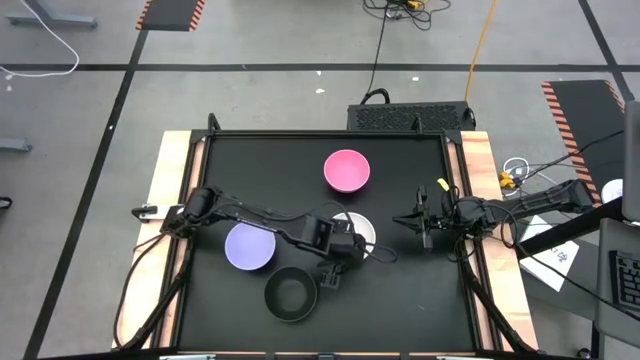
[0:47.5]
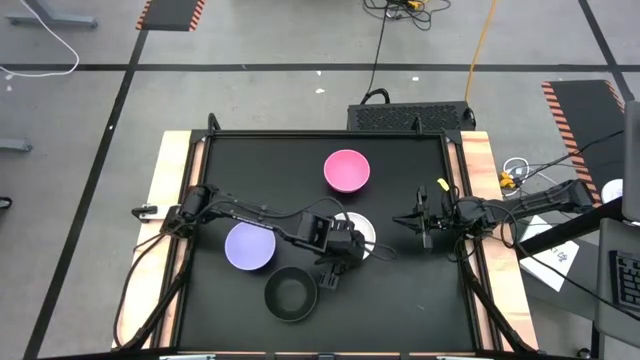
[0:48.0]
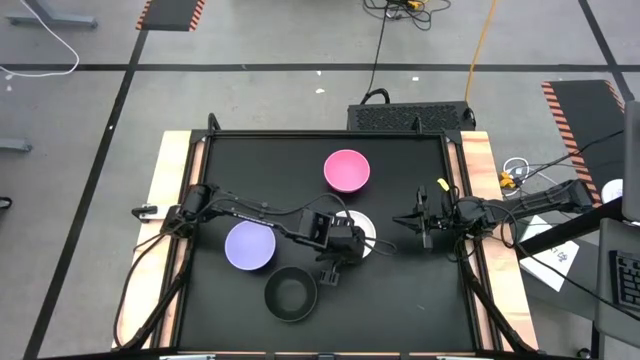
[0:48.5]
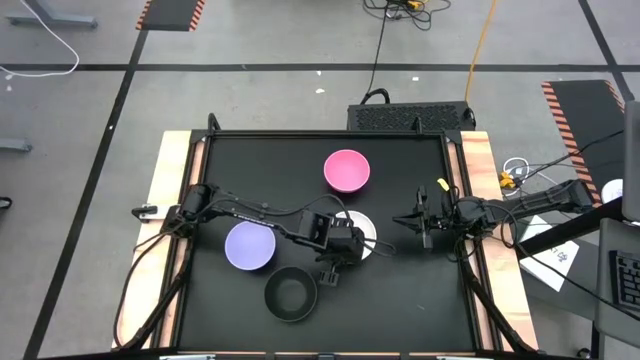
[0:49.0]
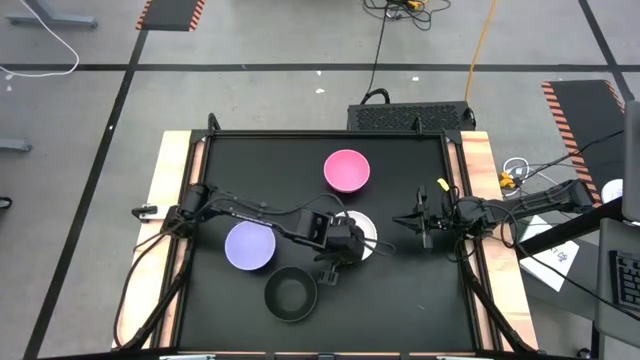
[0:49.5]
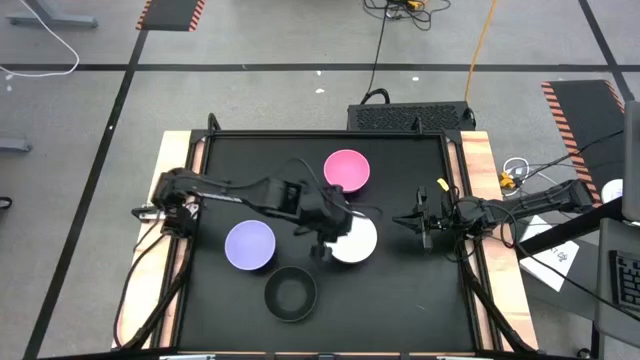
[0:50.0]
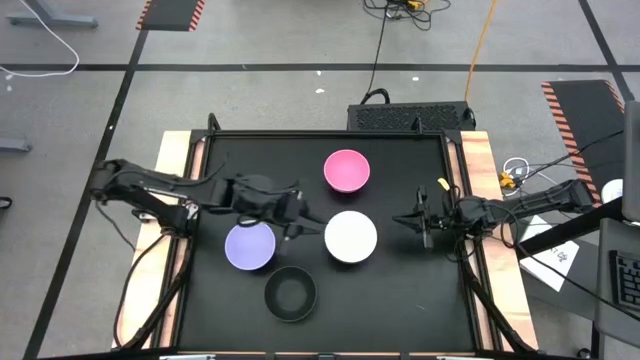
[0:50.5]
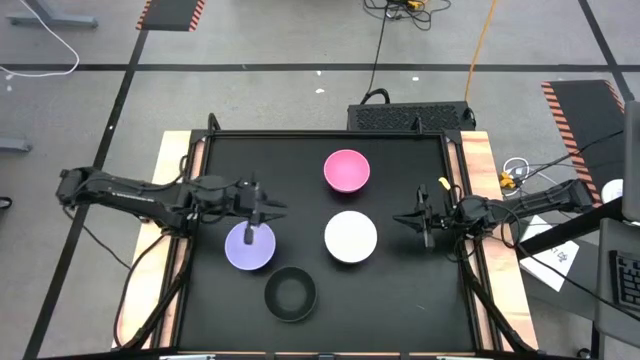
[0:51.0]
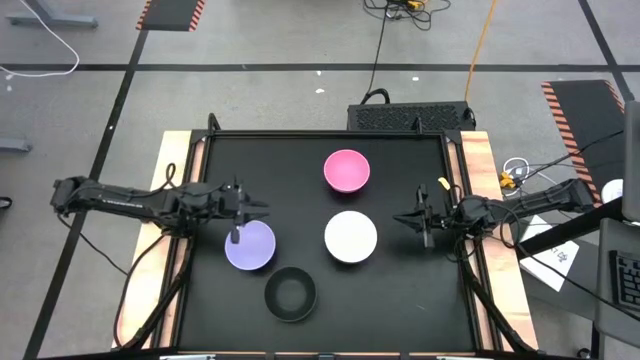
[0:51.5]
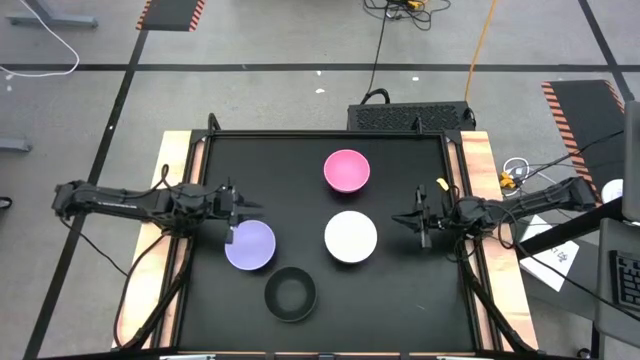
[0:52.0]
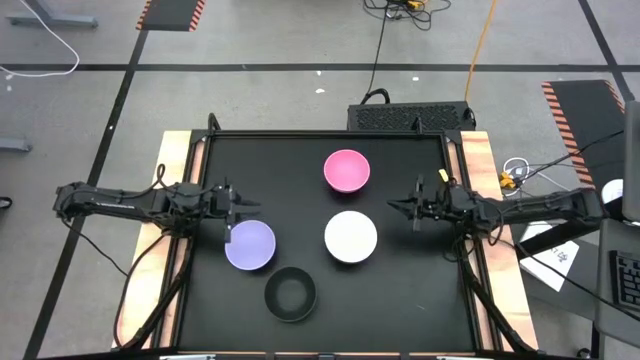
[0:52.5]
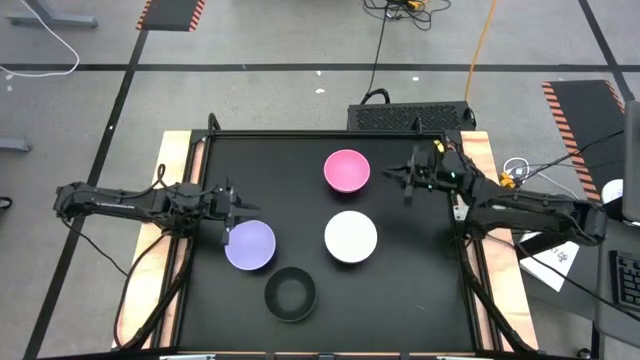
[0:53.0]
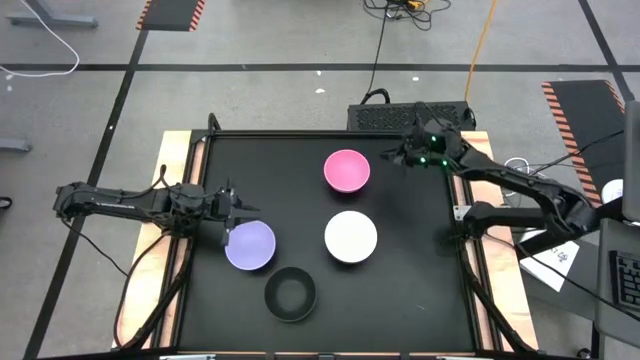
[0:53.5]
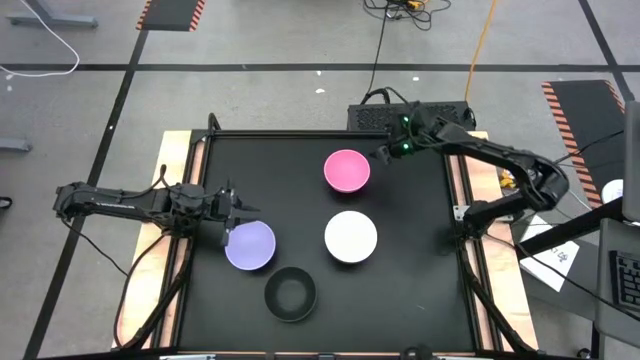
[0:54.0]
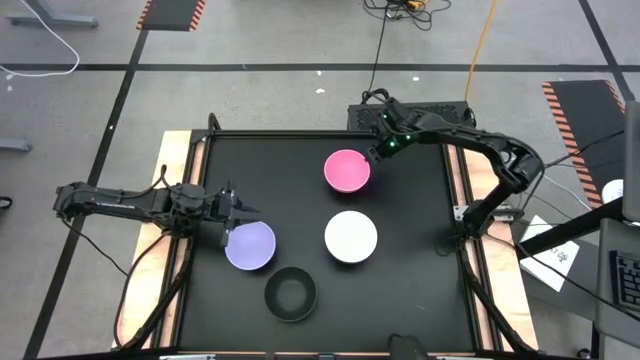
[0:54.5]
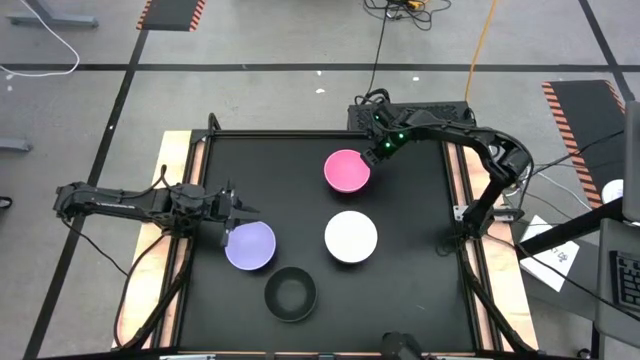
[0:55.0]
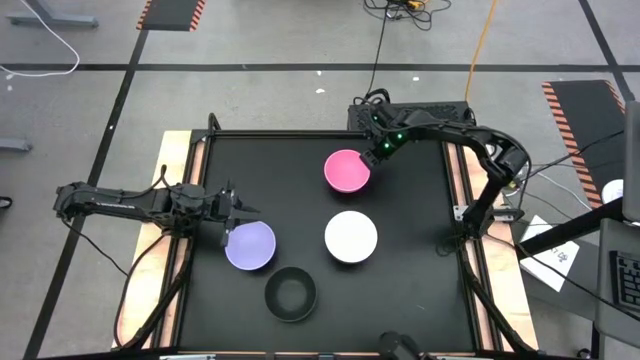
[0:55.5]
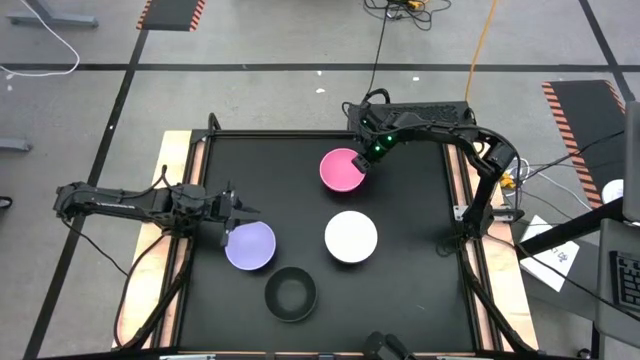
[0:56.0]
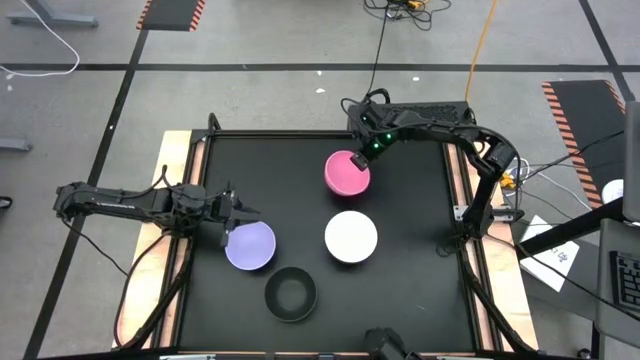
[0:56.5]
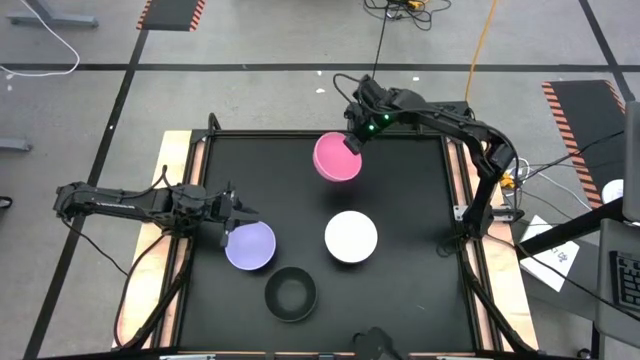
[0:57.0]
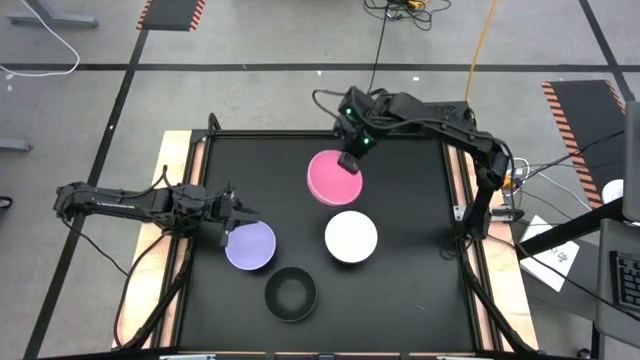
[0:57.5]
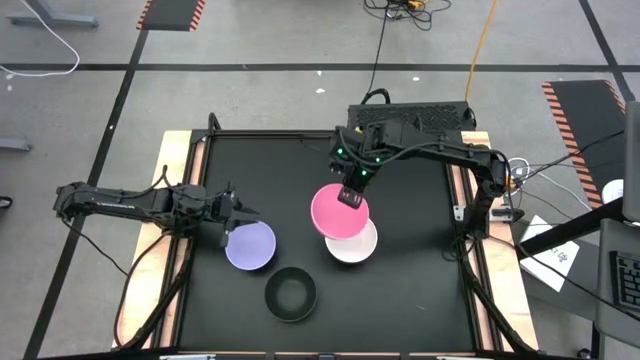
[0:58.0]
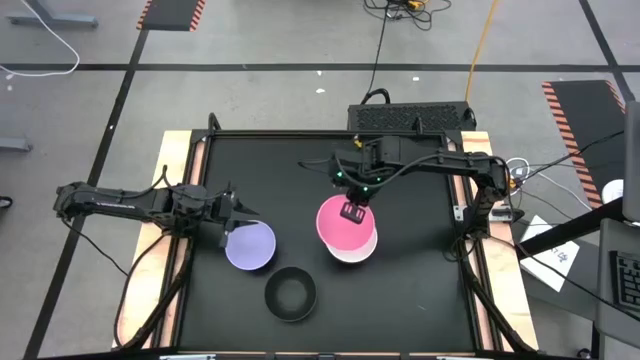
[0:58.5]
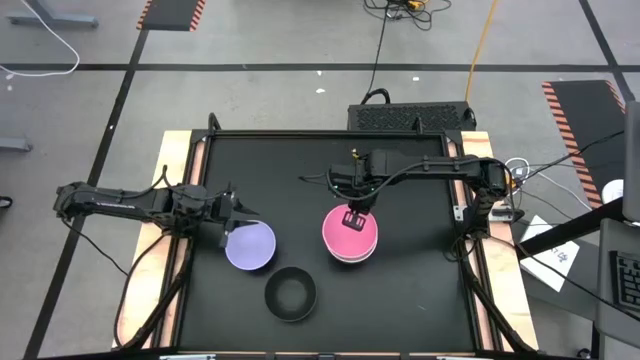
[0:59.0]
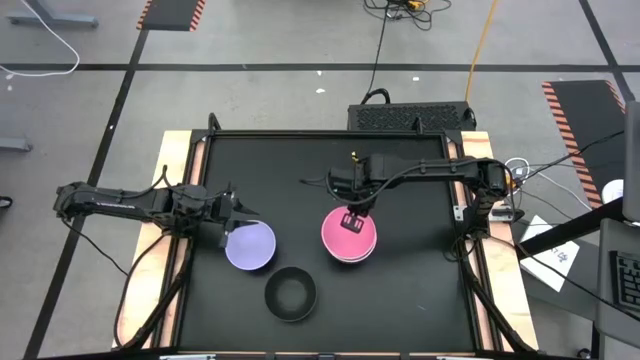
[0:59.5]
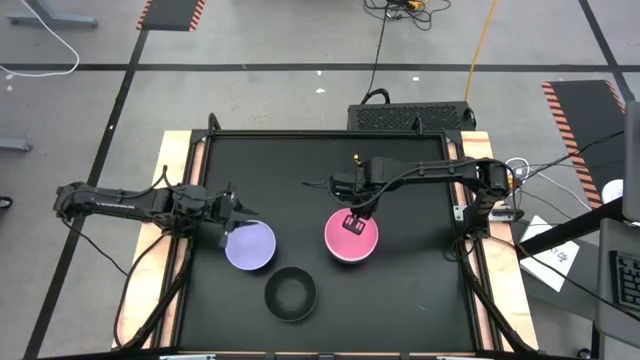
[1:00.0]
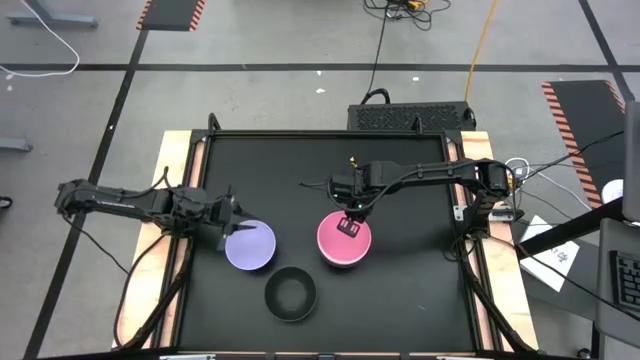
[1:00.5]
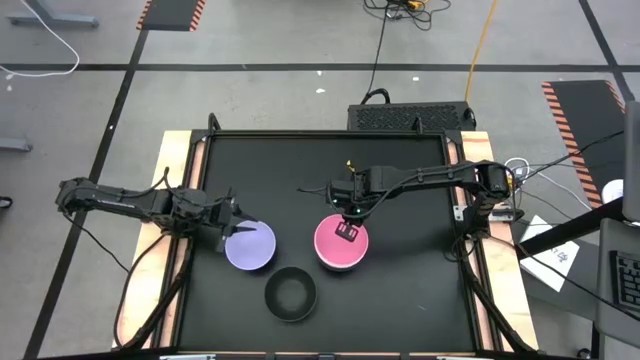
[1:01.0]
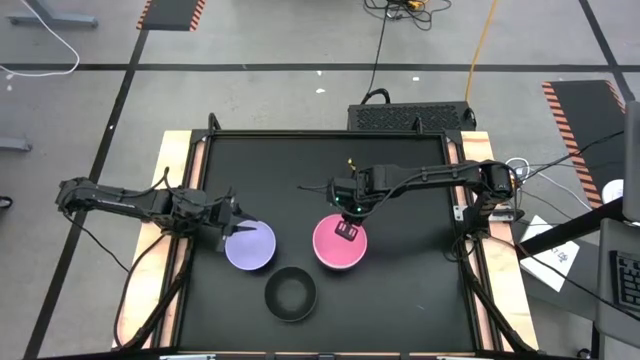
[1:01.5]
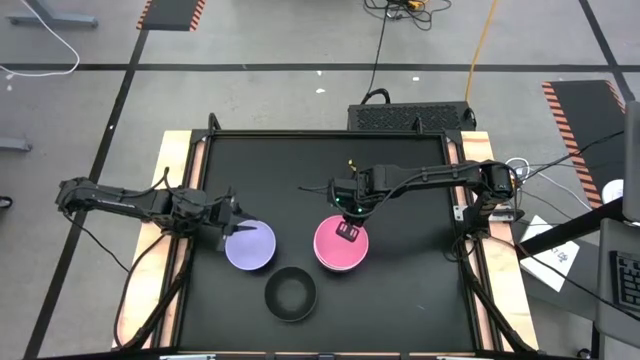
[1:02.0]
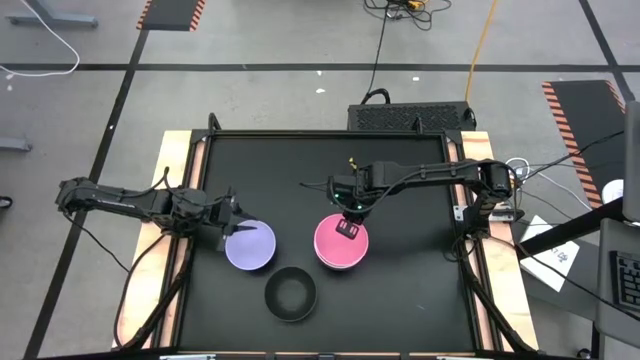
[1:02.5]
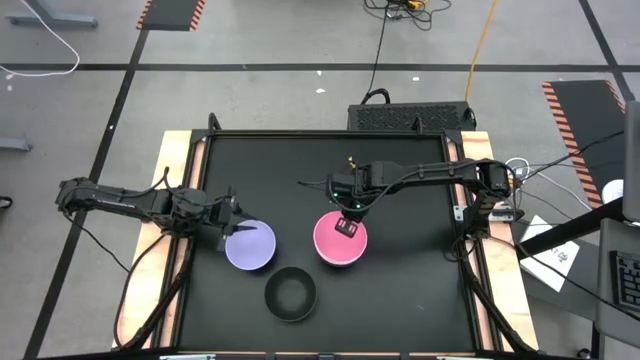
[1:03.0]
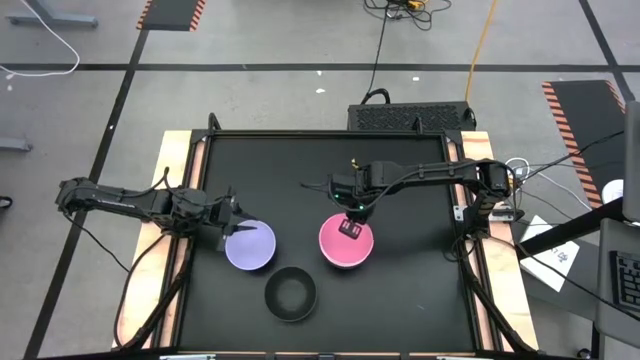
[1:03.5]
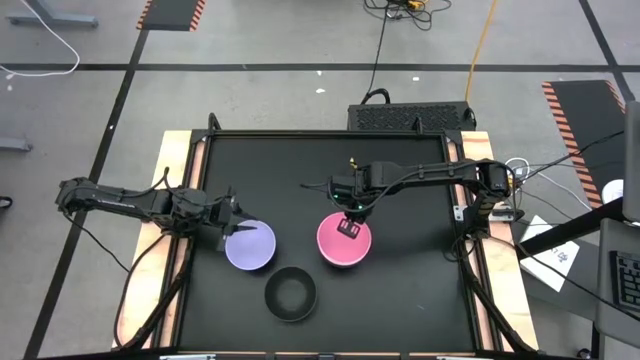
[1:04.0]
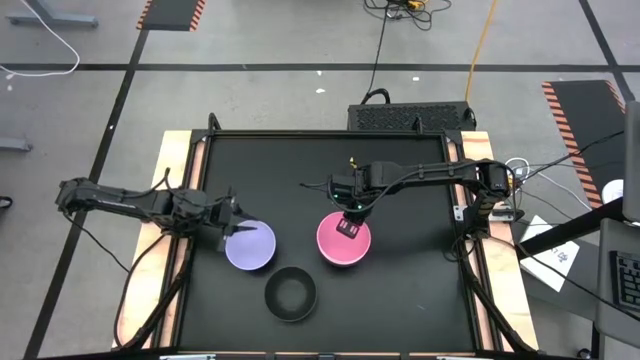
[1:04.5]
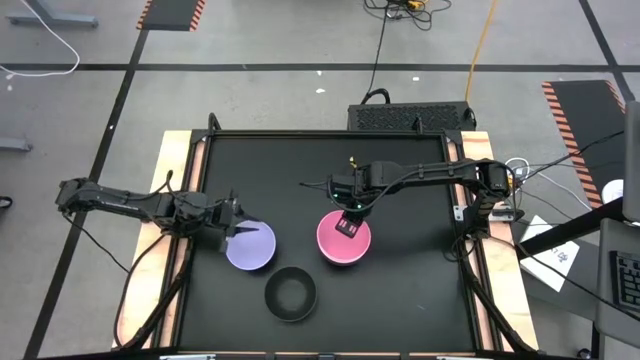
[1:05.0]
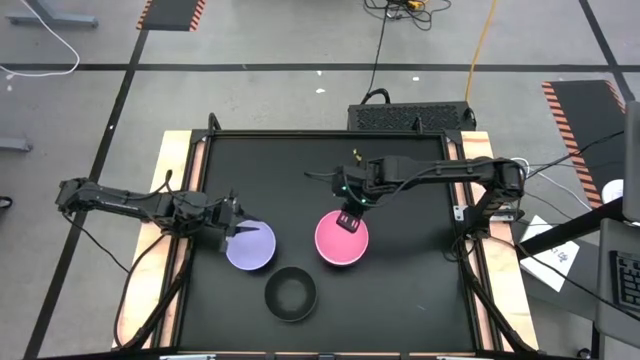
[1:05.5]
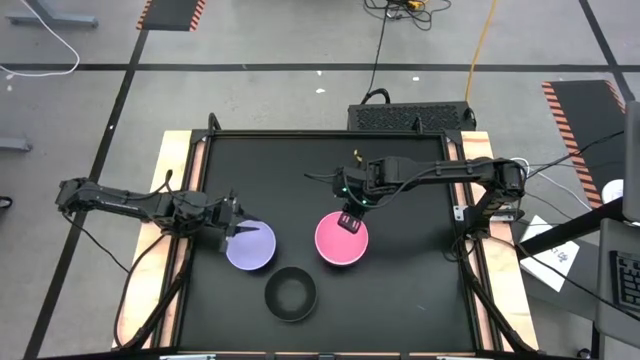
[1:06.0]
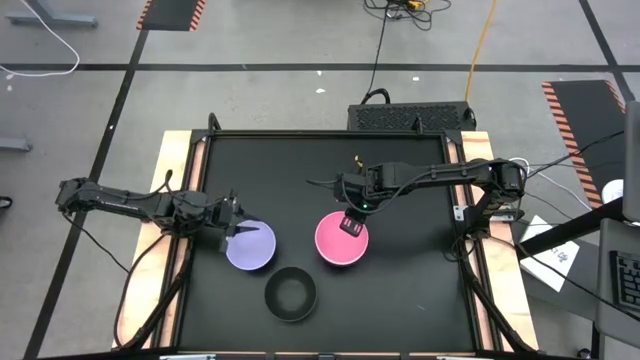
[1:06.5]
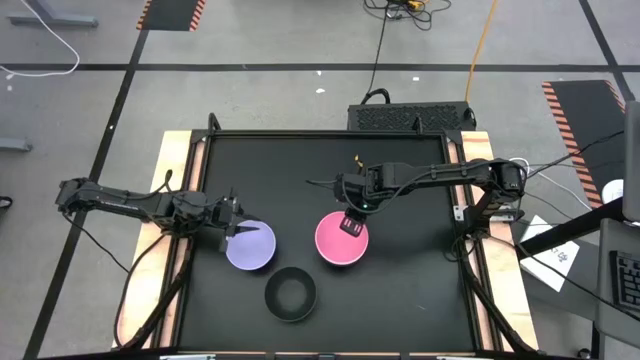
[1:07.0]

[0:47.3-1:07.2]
Task: Nest bowls inside each other
Stack the pink bowl on the top of the white bowl on the table
